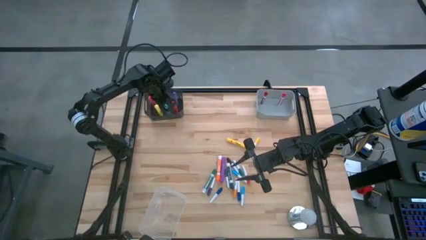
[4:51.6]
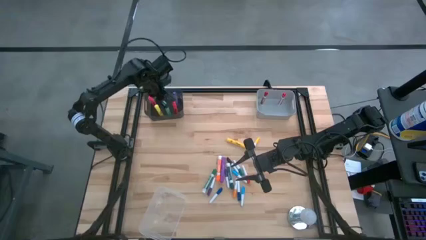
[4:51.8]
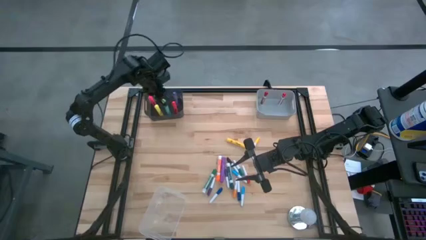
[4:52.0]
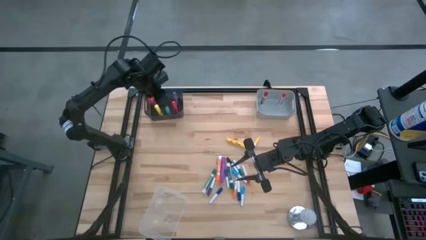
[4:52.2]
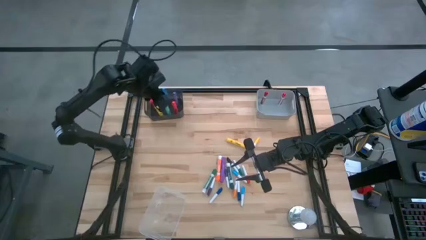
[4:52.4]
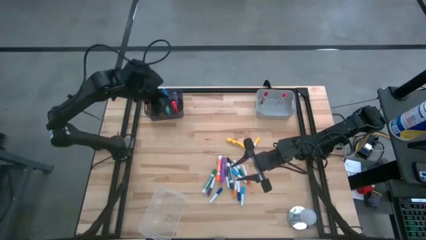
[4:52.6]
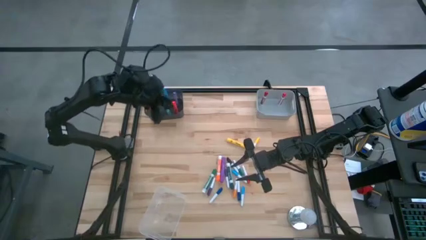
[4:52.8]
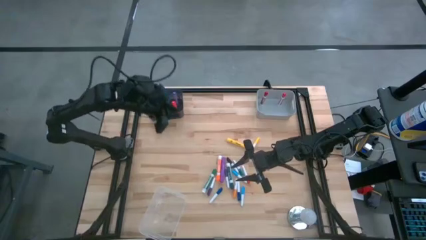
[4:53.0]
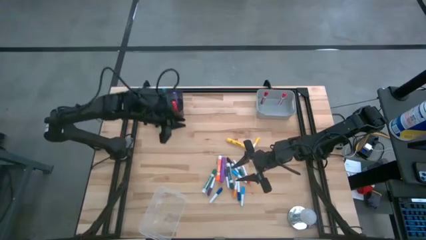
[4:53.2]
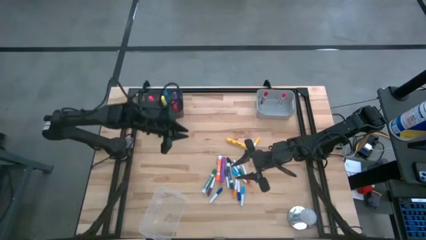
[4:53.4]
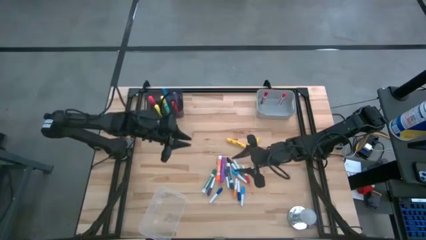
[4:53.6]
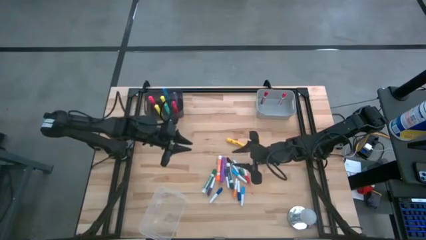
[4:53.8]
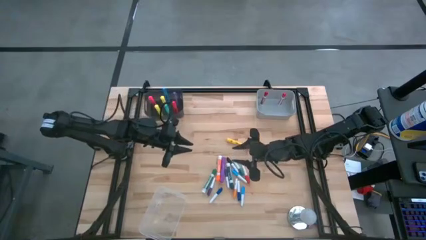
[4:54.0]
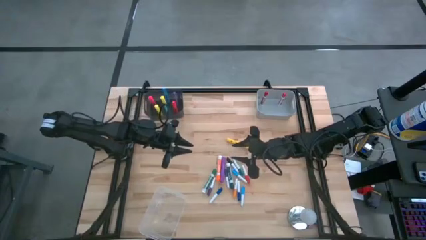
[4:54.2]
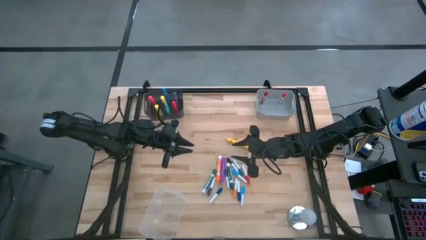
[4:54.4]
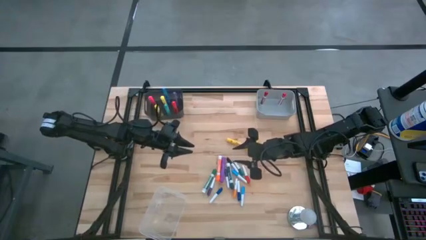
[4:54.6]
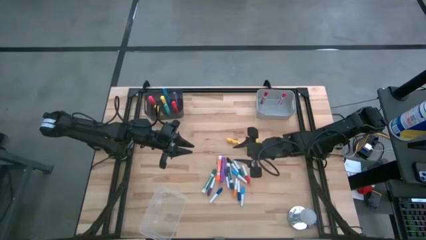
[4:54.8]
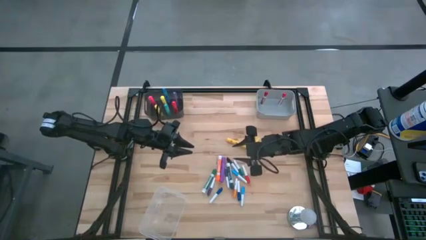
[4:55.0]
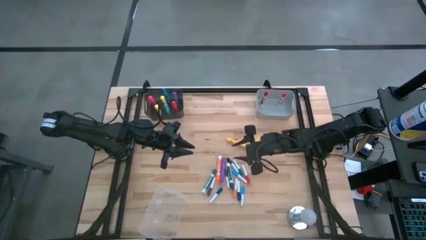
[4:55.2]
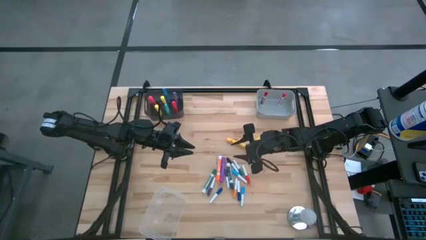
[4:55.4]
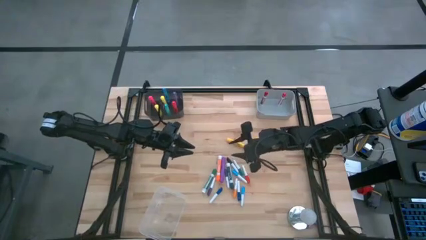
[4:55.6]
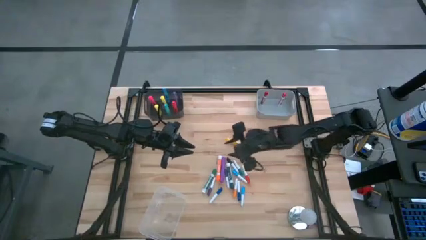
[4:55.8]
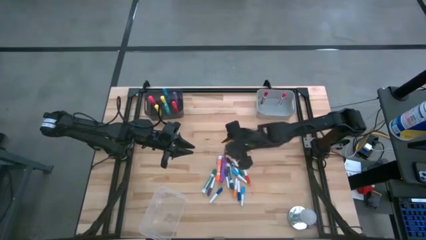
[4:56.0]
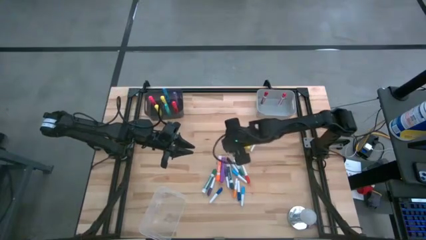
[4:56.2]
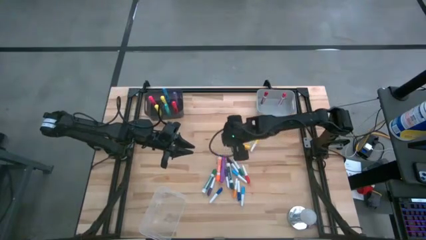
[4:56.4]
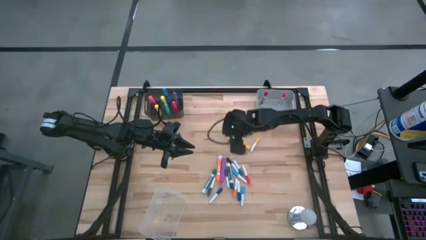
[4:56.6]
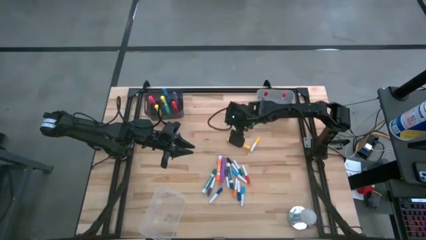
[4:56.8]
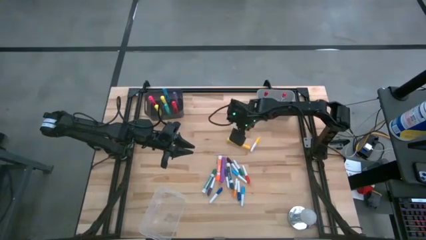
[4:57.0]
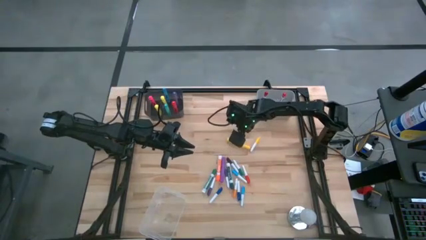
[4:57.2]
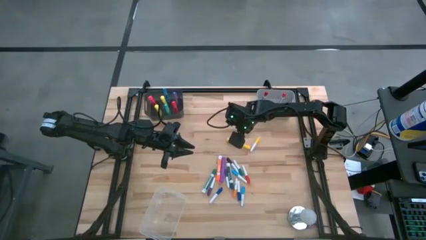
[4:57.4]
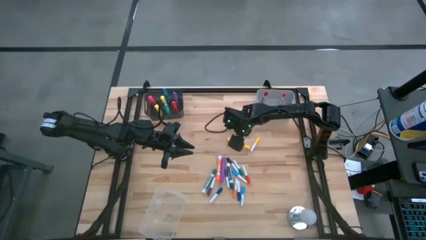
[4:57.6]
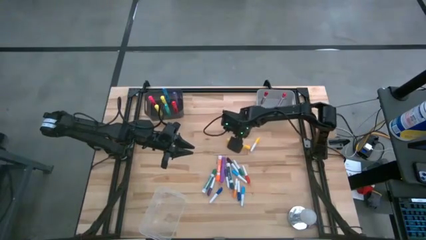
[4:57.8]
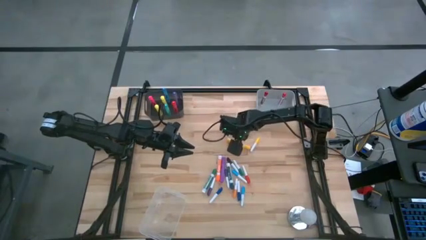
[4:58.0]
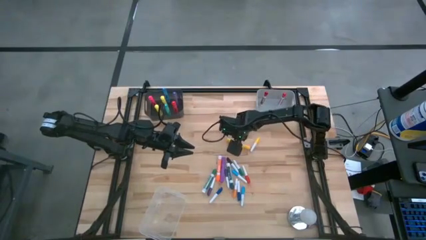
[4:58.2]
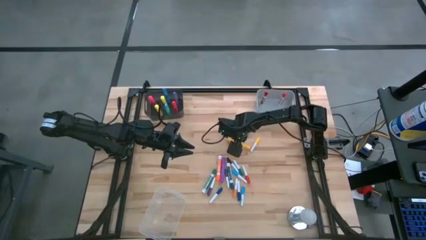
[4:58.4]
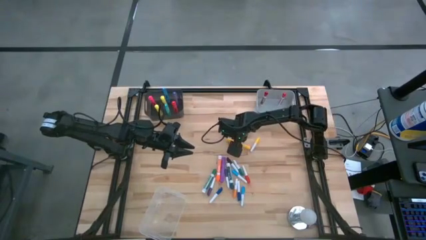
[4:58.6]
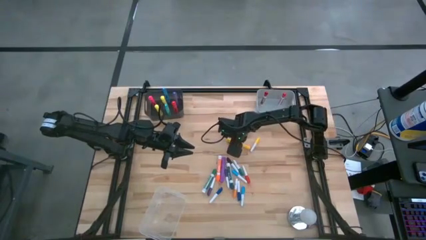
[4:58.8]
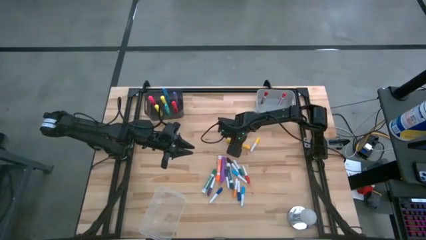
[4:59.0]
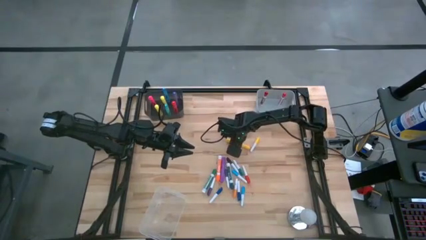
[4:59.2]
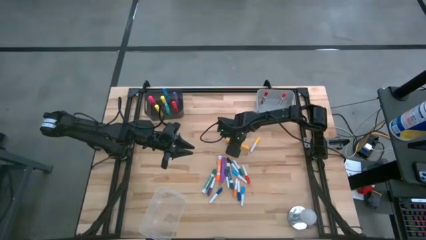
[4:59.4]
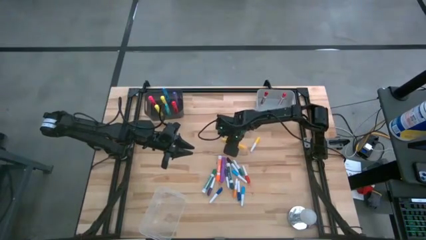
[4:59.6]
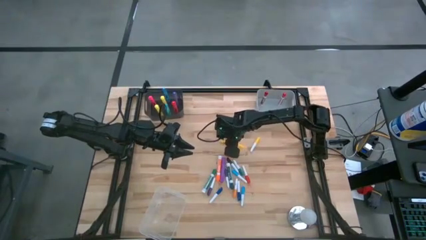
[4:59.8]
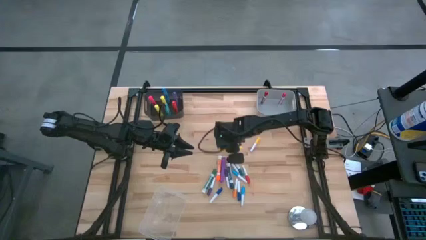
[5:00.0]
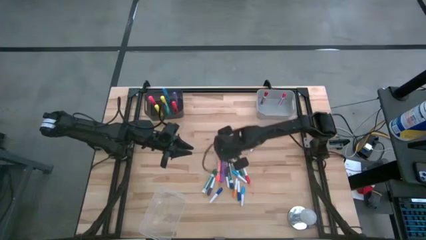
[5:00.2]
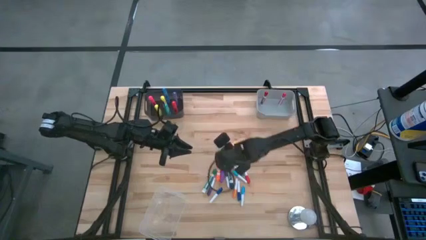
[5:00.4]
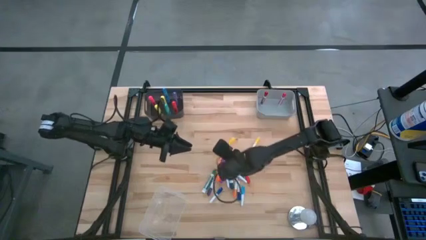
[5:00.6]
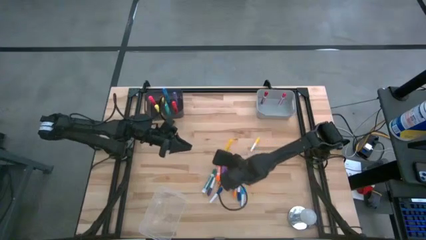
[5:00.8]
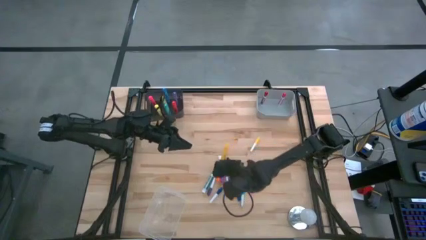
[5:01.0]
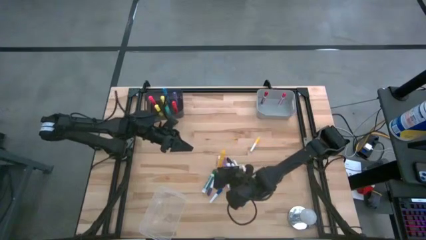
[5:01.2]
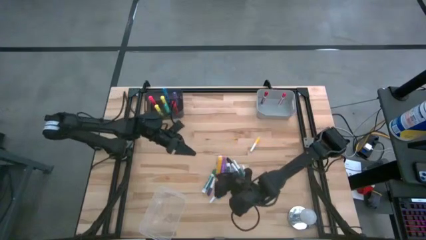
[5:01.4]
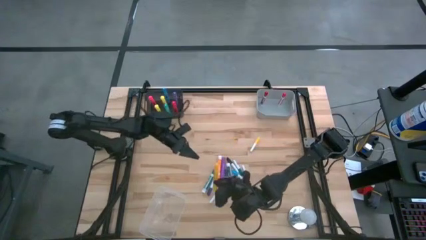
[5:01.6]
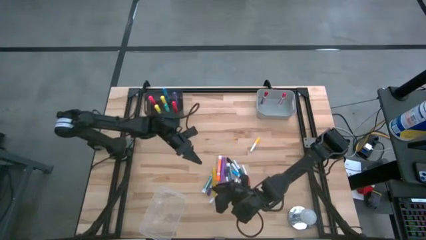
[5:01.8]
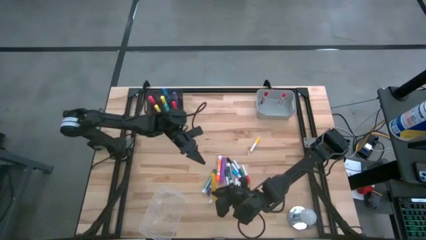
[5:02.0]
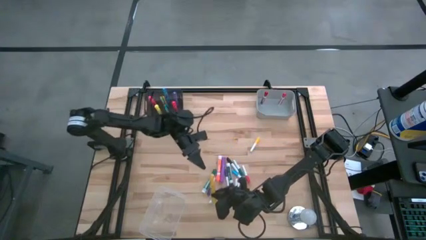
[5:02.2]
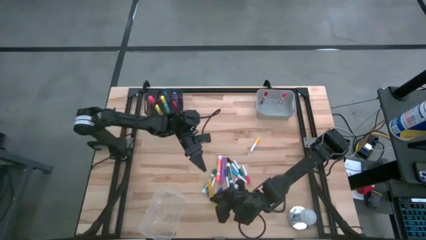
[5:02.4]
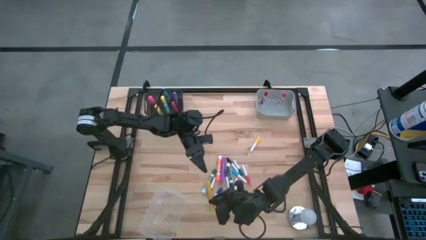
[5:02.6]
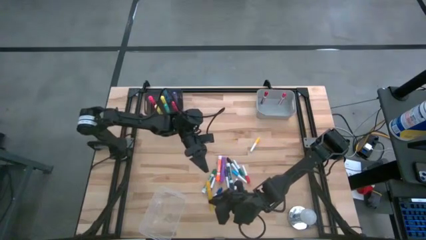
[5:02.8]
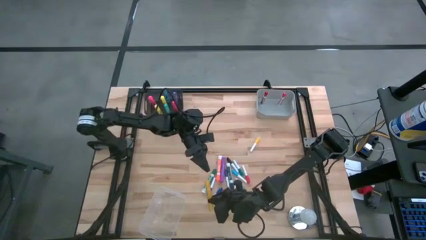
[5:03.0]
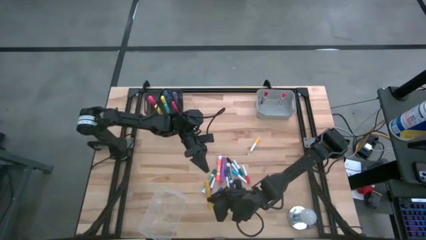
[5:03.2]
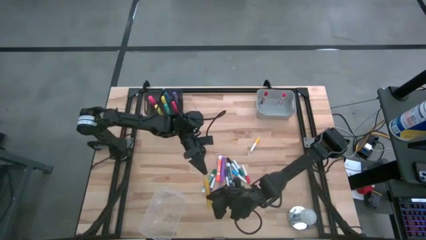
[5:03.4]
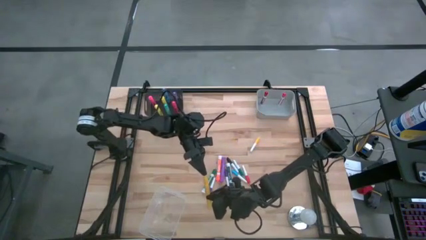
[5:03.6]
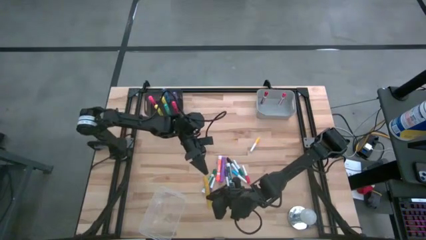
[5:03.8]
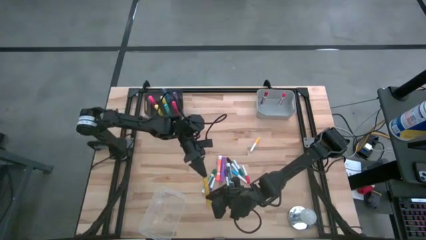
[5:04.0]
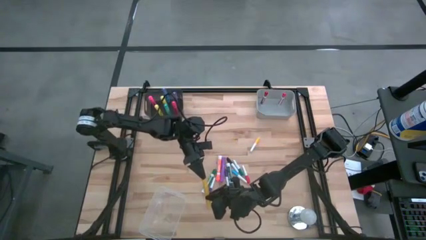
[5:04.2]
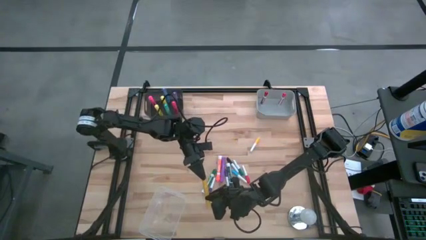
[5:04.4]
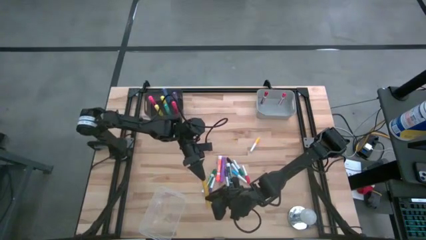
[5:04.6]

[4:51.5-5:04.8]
Task: Pick & Place Markers
Put the dark yellow highlighter pen into the black bin

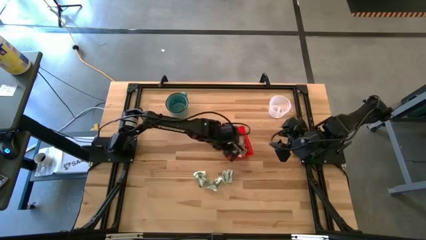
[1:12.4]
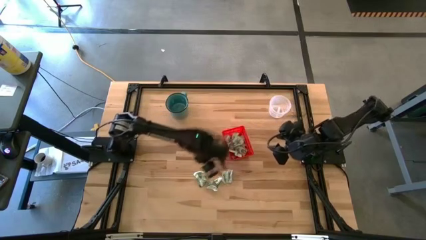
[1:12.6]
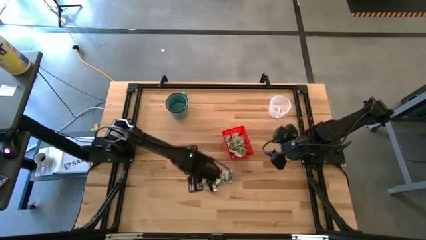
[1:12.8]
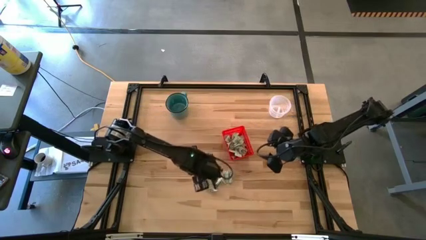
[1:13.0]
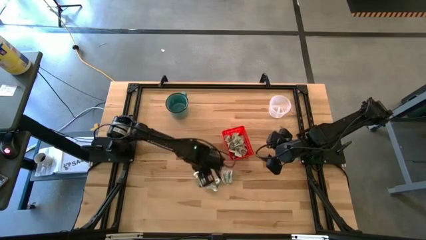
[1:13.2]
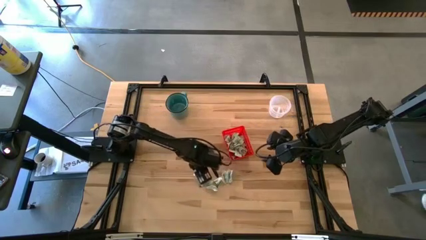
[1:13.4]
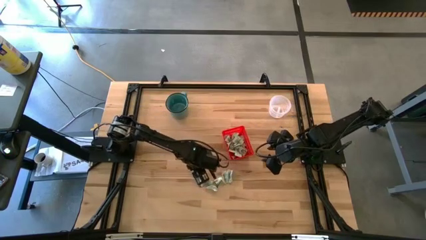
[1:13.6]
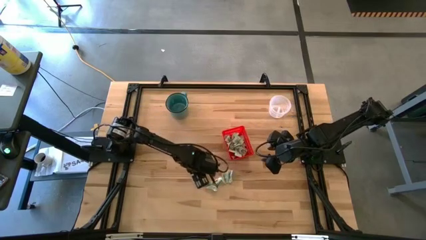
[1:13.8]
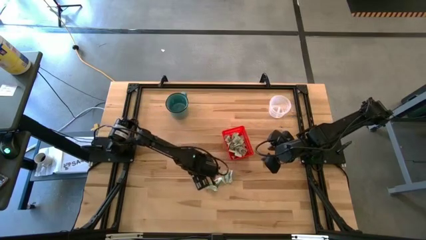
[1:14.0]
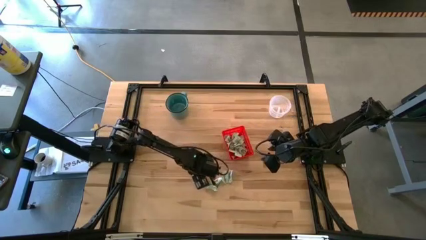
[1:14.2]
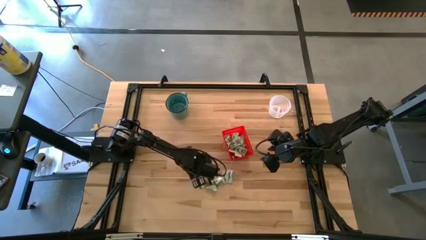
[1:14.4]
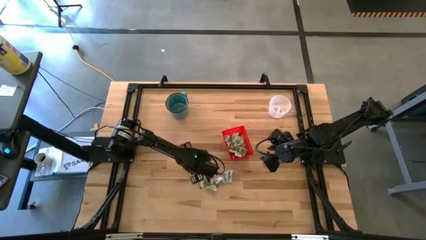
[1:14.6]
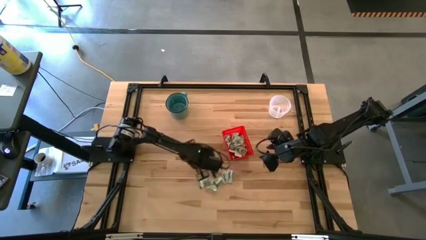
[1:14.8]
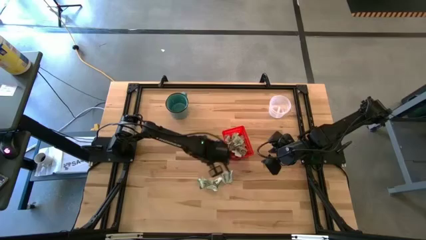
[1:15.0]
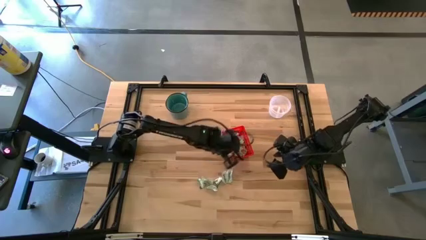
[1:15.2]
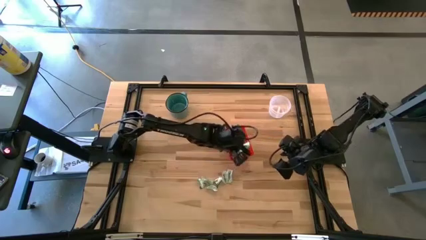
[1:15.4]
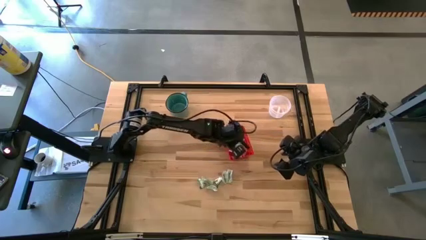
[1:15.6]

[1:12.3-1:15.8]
Task: Pick and place items into bin
Put the stevia packet into the orange bin
